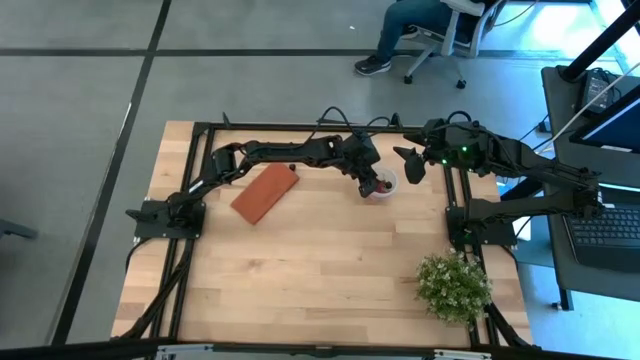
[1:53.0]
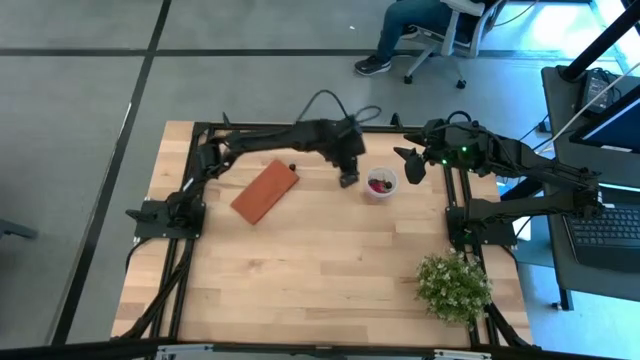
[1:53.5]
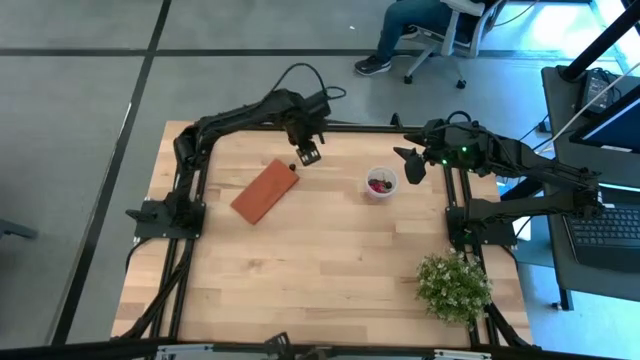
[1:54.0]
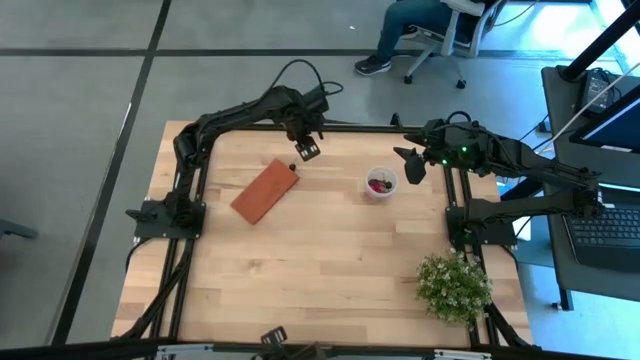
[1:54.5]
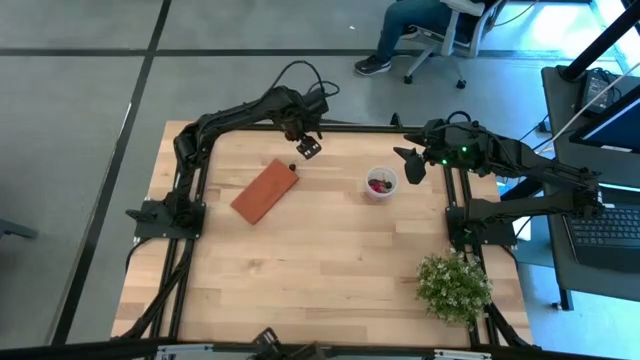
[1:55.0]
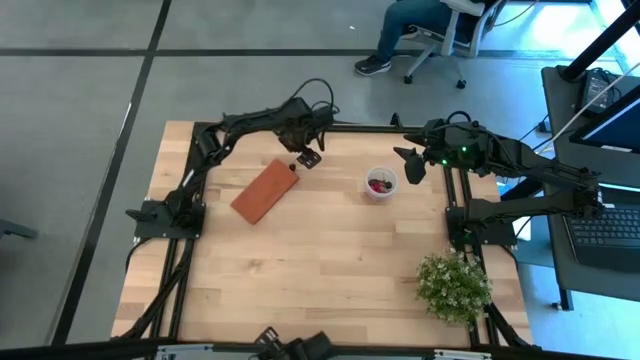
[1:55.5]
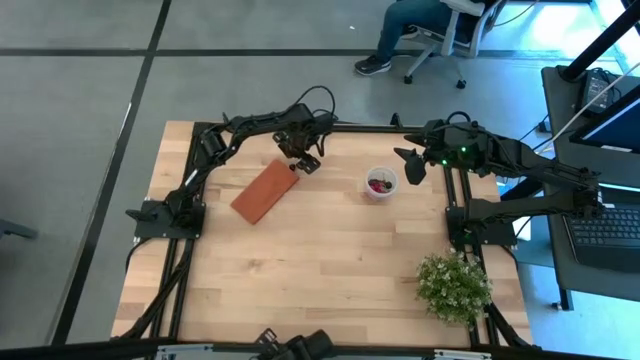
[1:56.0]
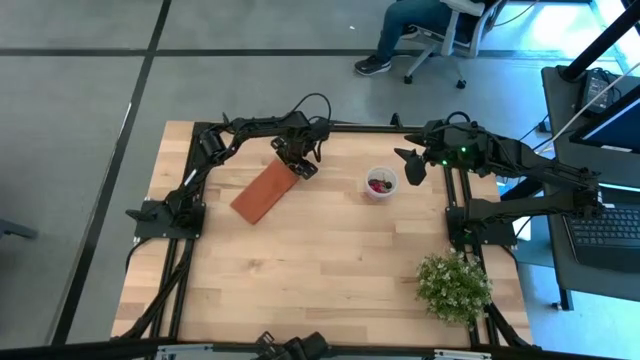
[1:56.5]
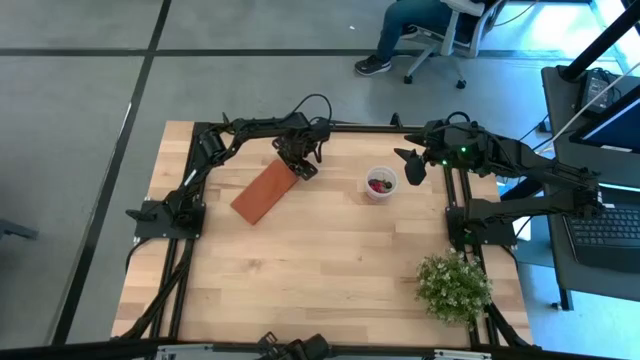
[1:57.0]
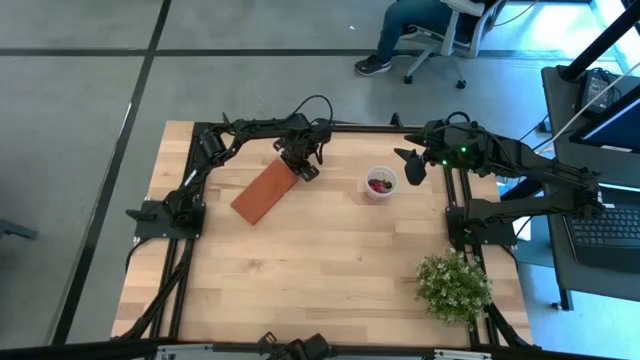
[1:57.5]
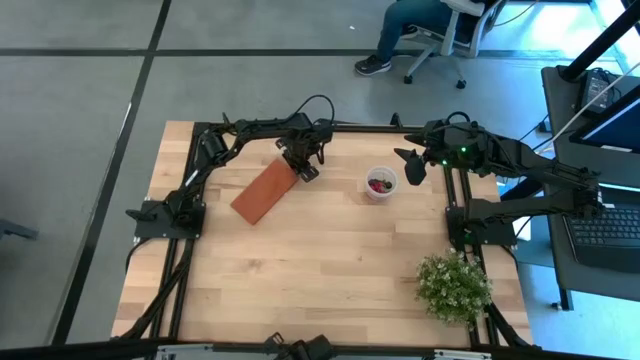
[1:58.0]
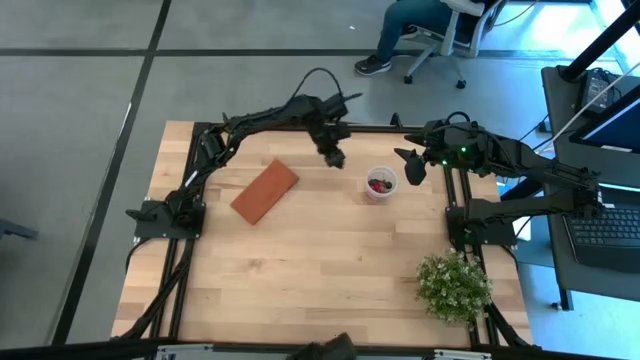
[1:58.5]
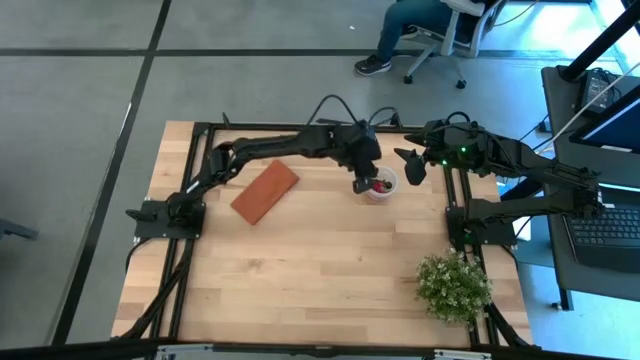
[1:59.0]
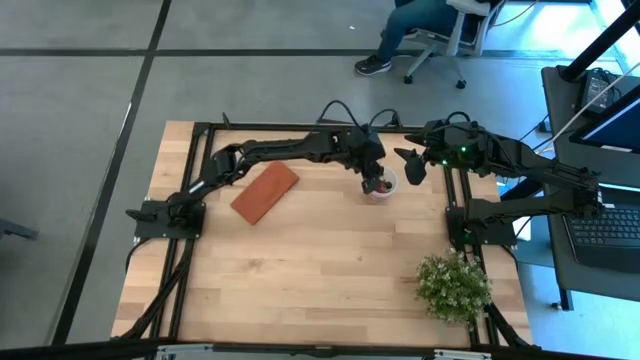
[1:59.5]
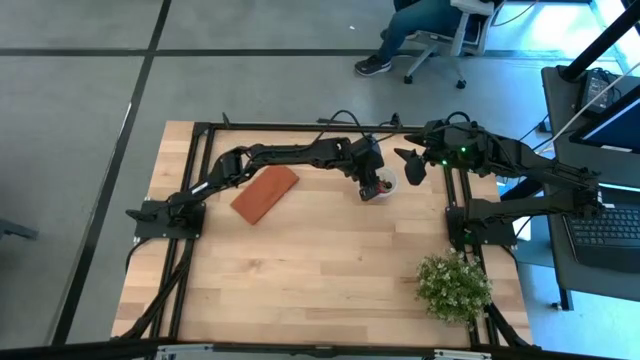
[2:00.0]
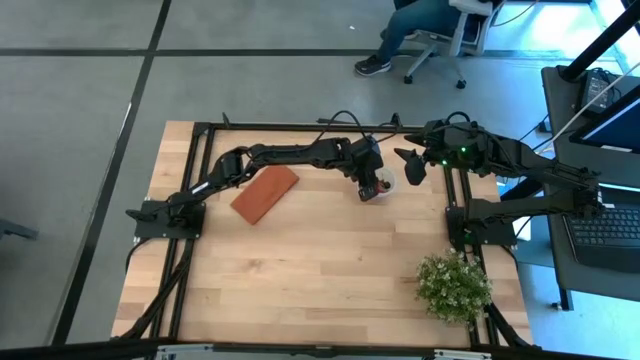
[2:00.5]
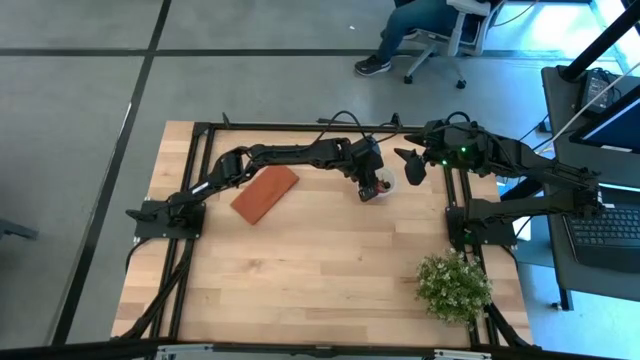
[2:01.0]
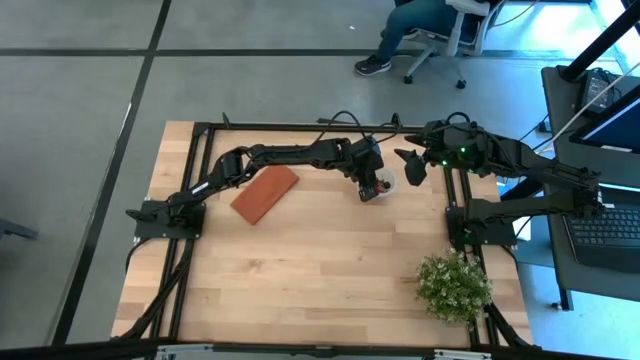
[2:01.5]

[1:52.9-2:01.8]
Task: Pick and placing Produce into tupperware
Put the black cherry into the transparent container

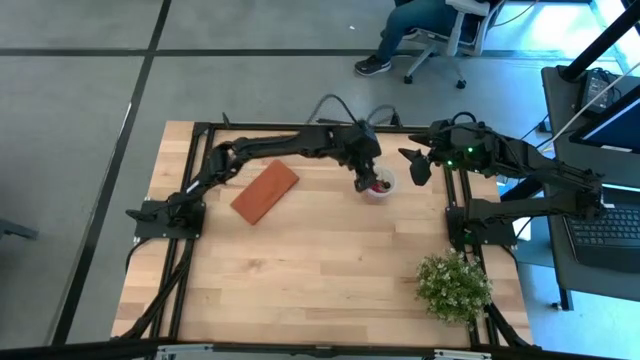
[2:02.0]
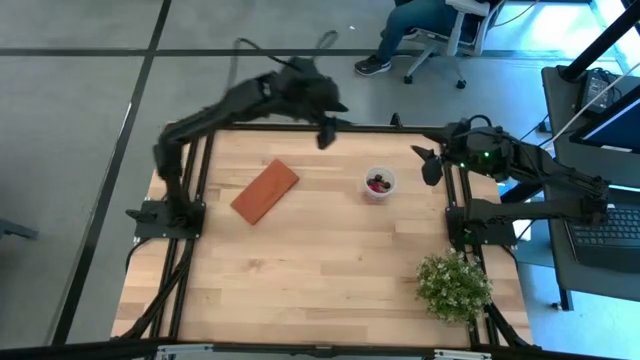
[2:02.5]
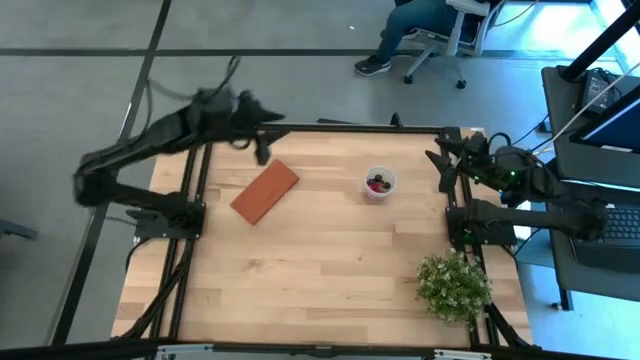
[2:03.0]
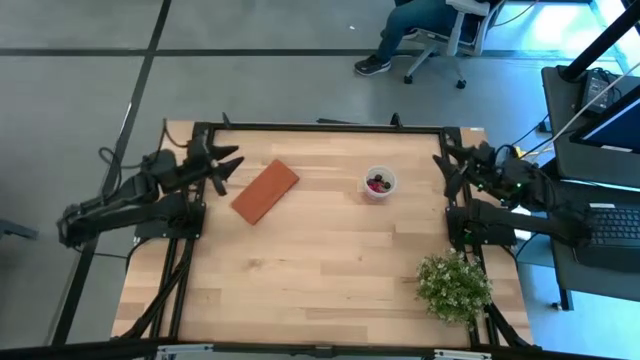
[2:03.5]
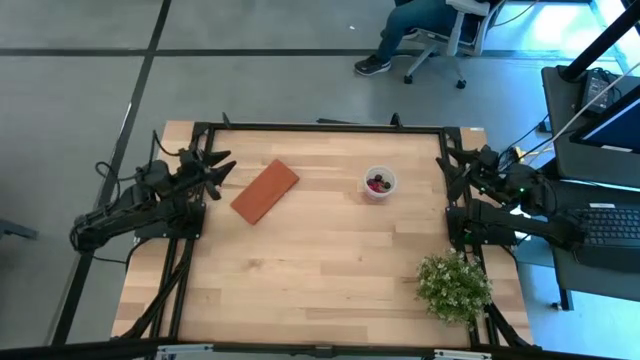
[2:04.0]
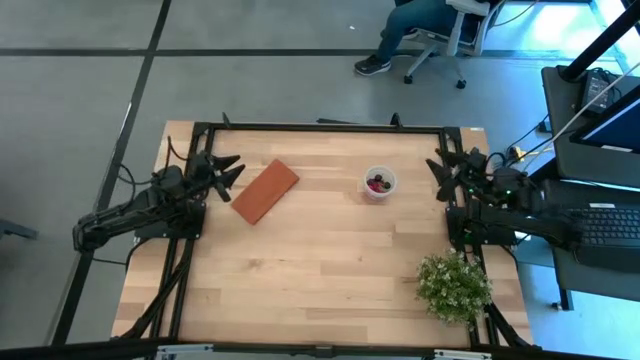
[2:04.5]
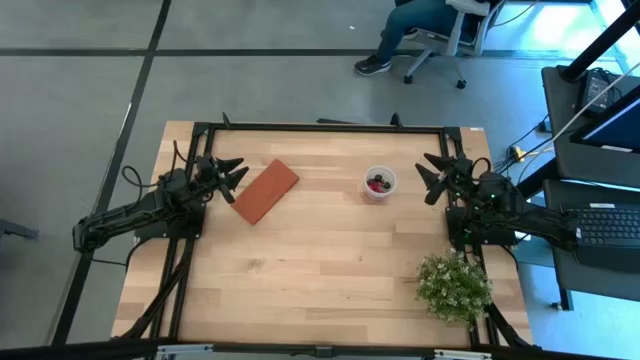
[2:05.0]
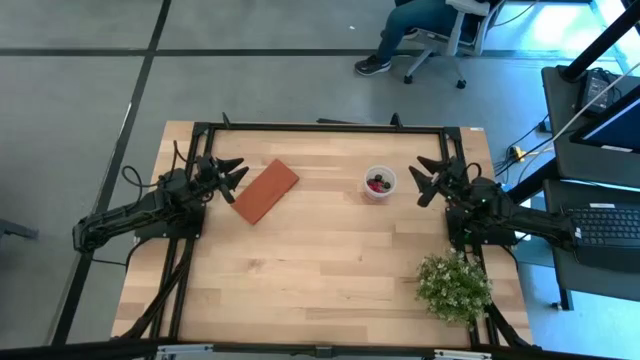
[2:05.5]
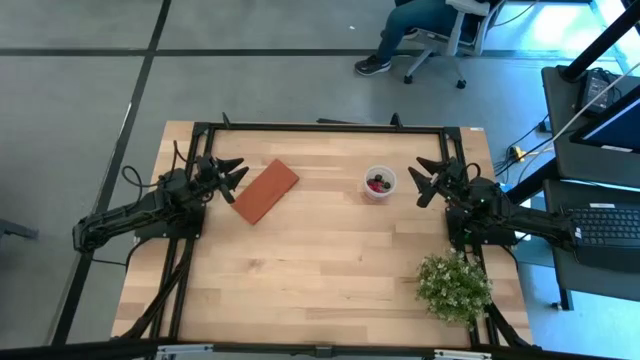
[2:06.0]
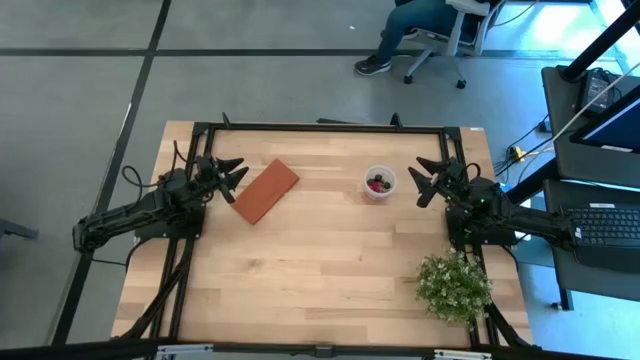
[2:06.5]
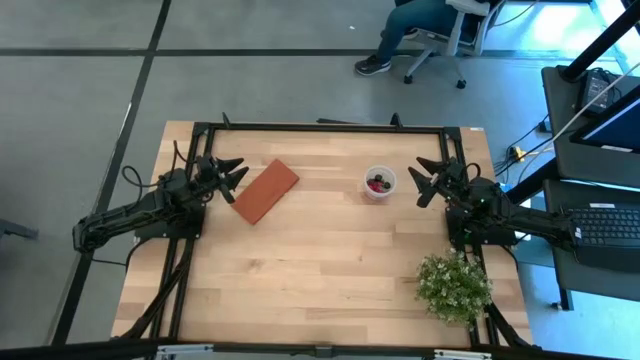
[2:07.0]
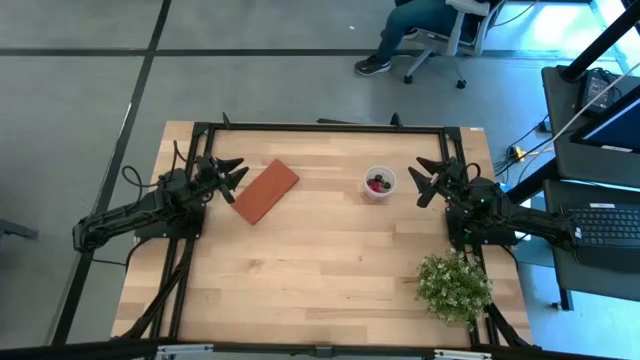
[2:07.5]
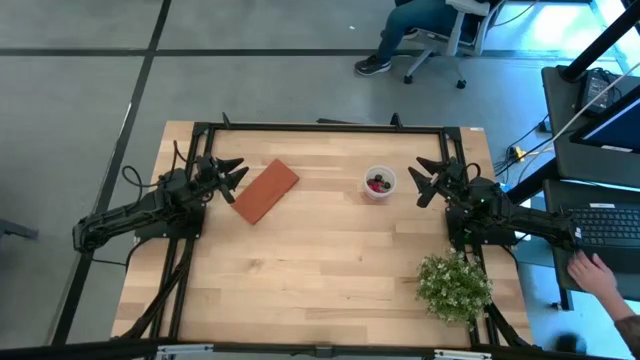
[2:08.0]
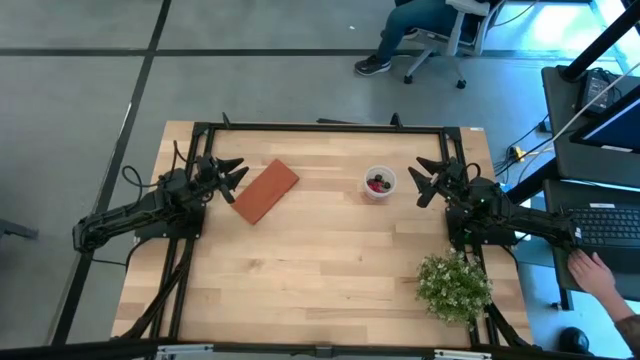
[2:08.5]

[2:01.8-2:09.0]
Return to Home Position

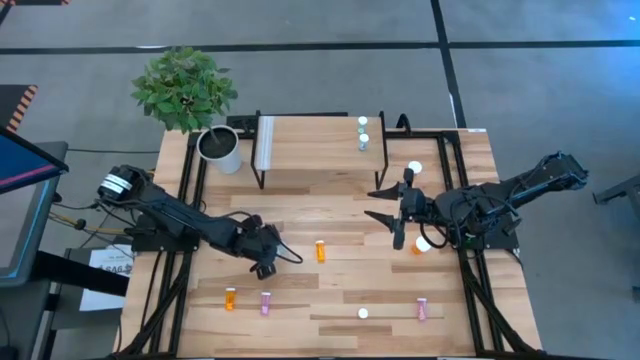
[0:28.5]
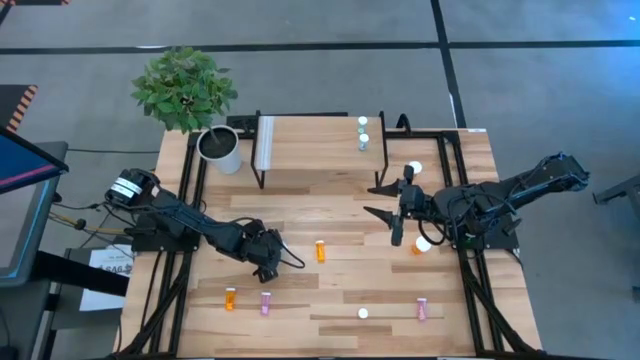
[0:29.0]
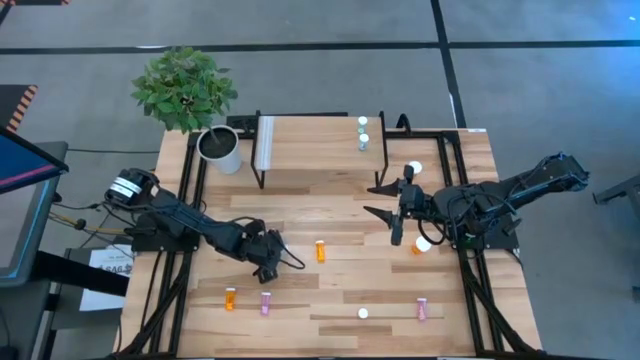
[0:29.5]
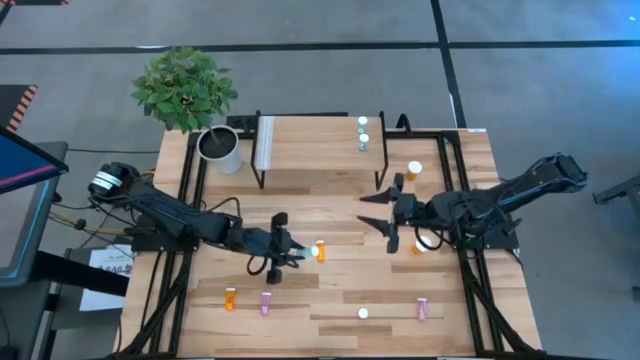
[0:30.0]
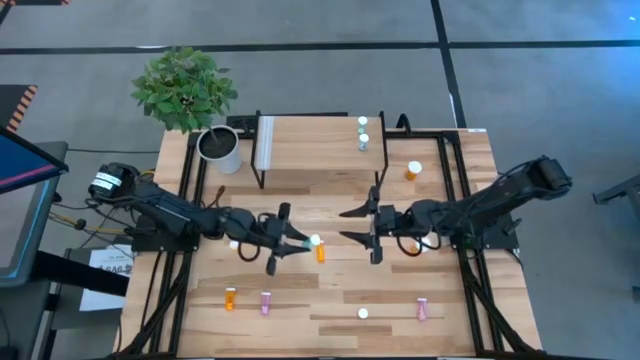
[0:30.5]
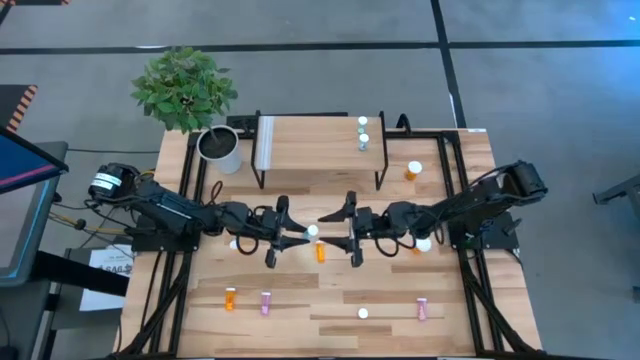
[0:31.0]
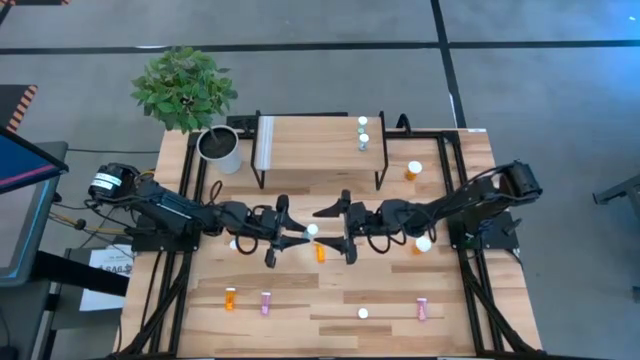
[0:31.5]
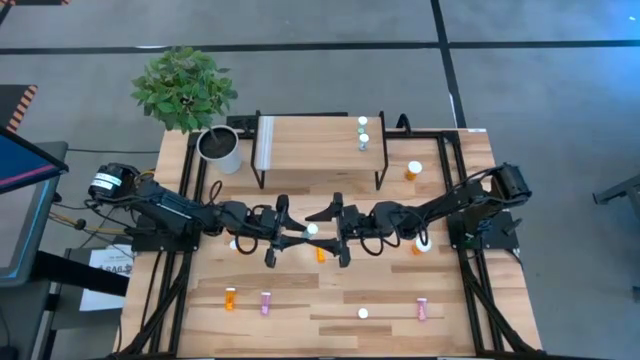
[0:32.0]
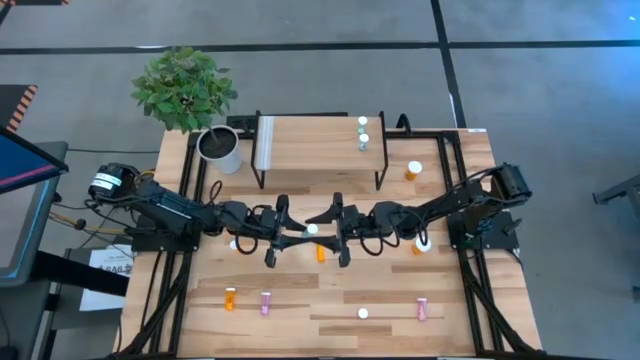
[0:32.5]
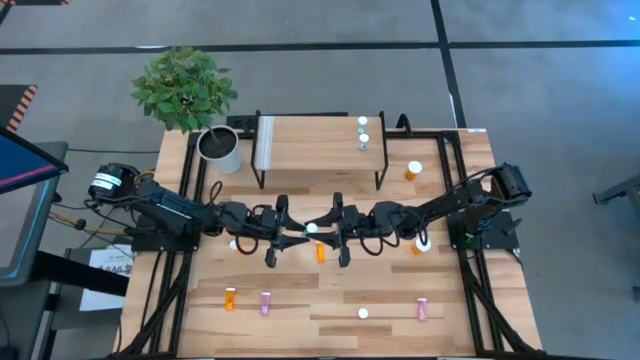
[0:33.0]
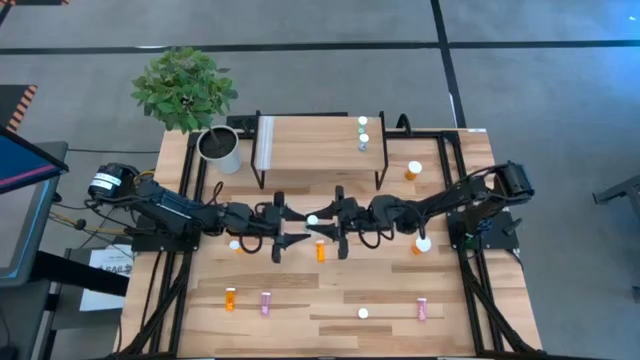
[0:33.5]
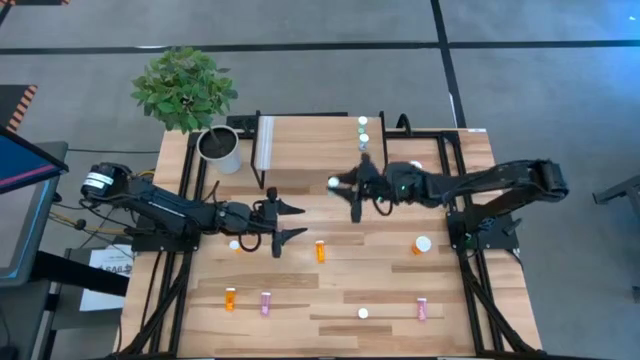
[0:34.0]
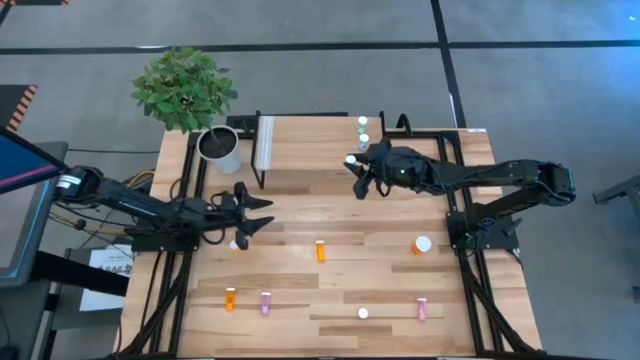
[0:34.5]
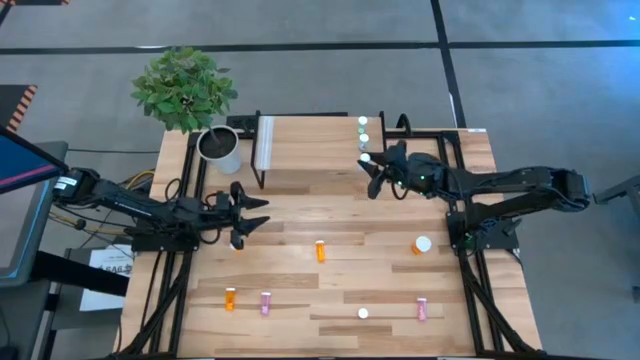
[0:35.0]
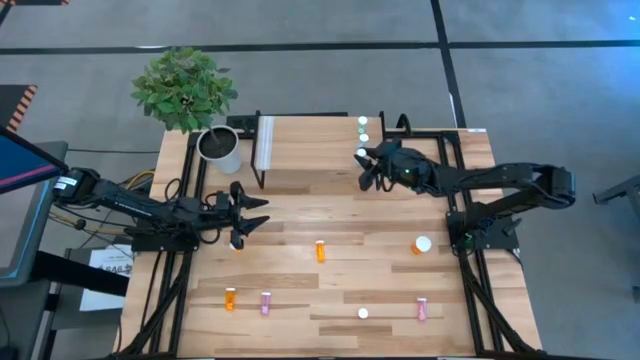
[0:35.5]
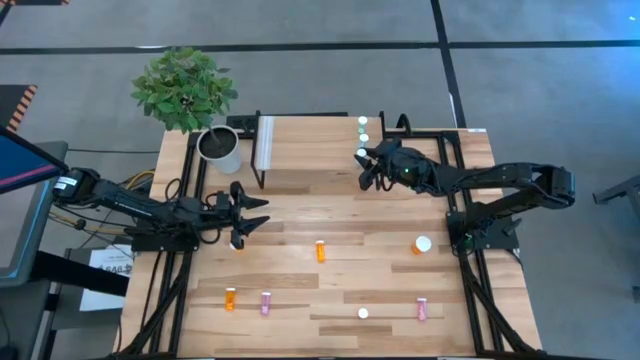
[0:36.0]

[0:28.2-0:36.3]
Task: Pick and place medicine bottles onto shelf by color
Put the blue pill bottle on the shelf aligned with the other blue pill bottles
